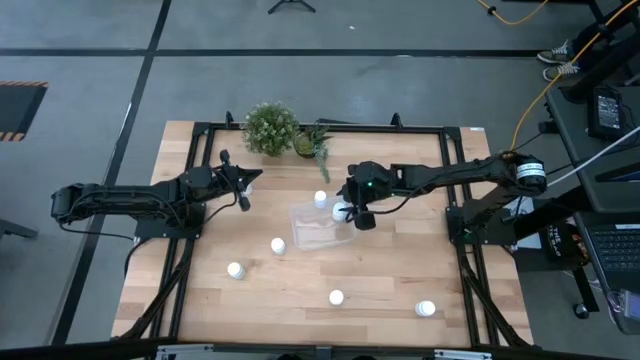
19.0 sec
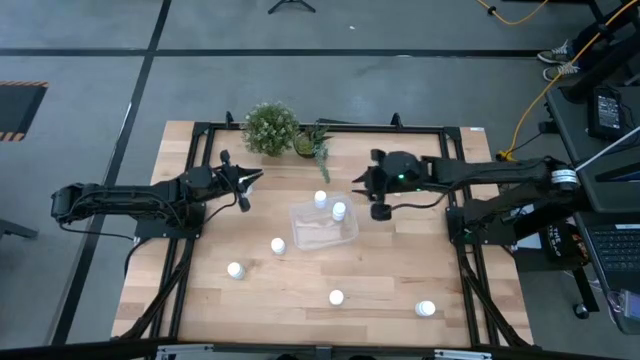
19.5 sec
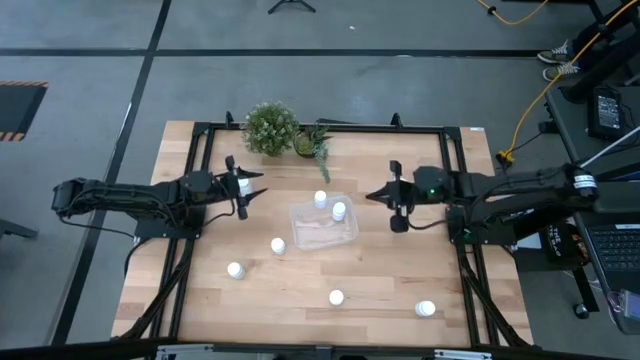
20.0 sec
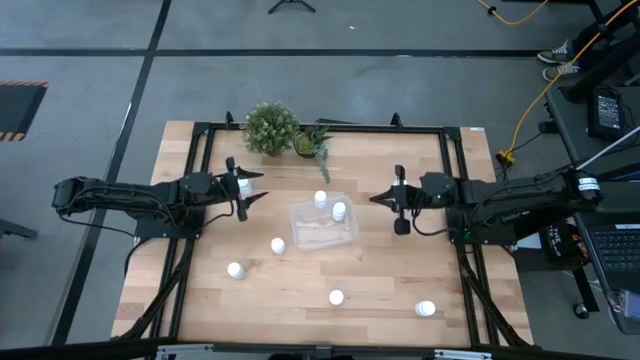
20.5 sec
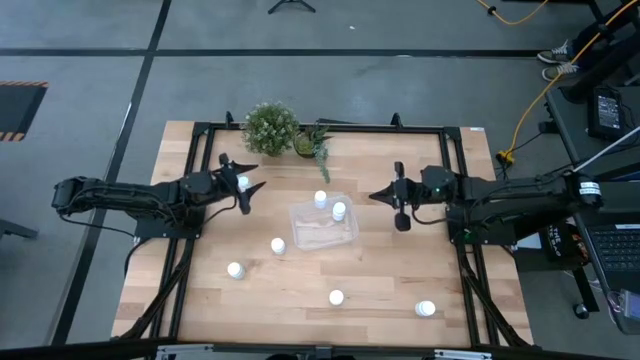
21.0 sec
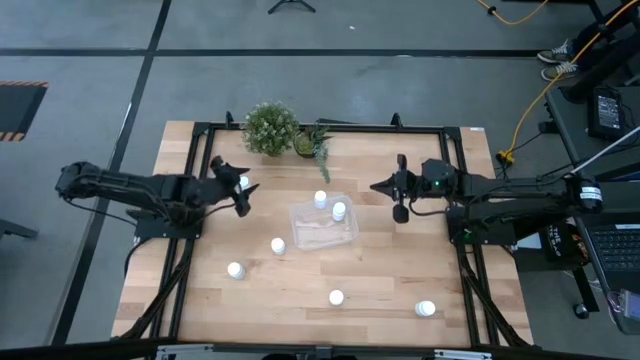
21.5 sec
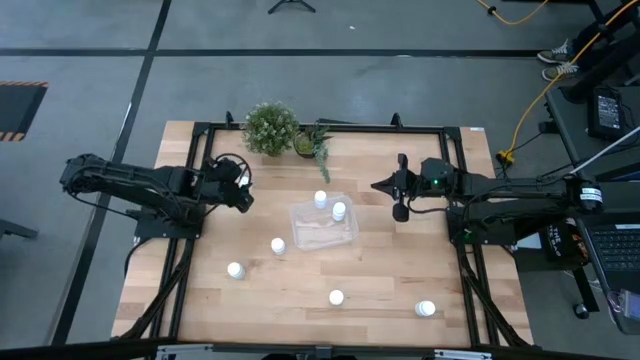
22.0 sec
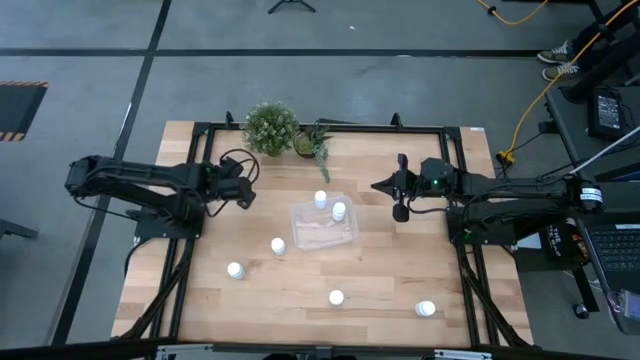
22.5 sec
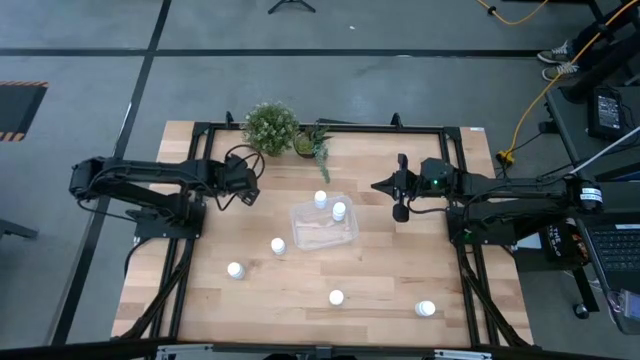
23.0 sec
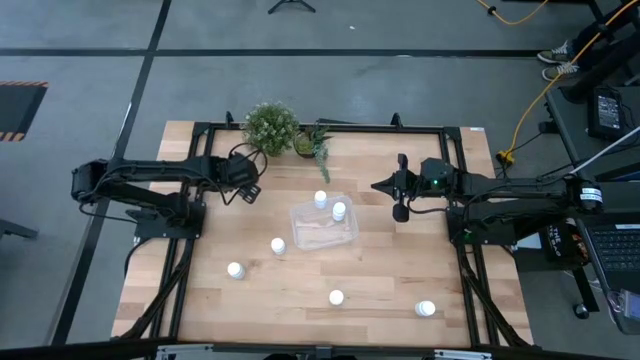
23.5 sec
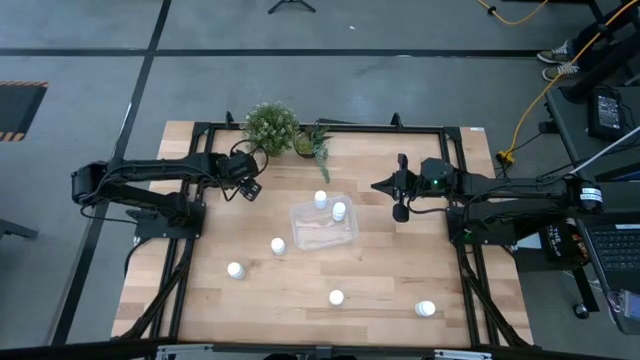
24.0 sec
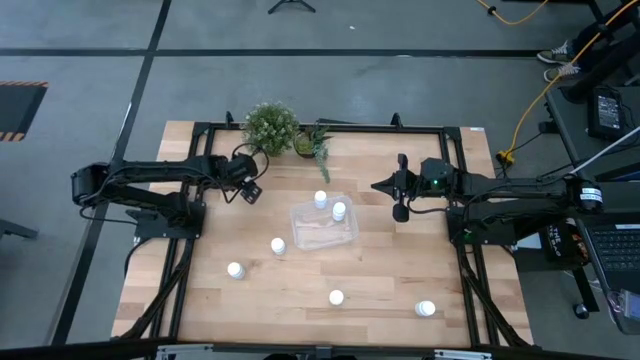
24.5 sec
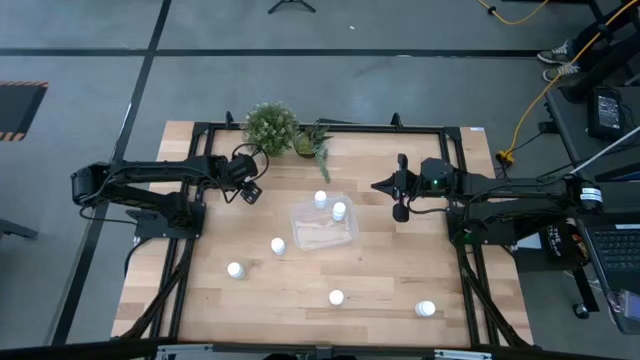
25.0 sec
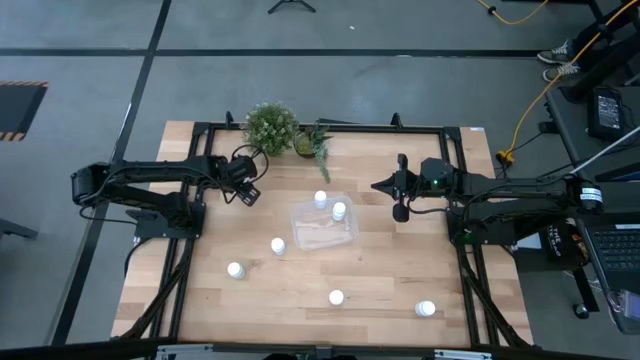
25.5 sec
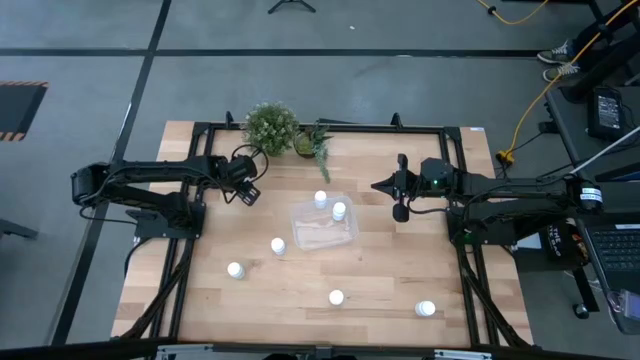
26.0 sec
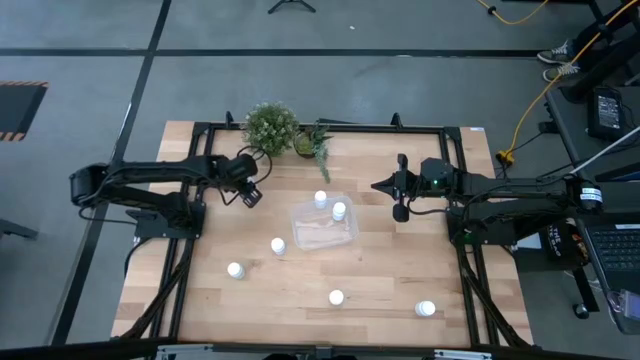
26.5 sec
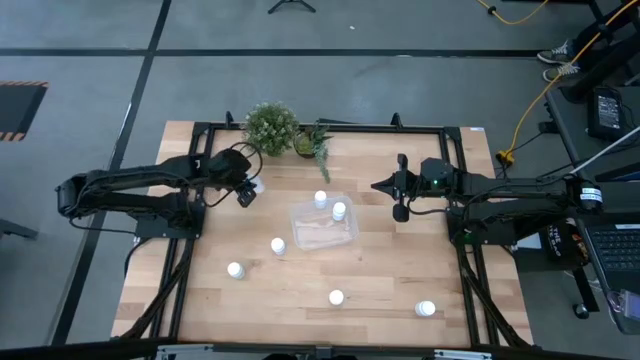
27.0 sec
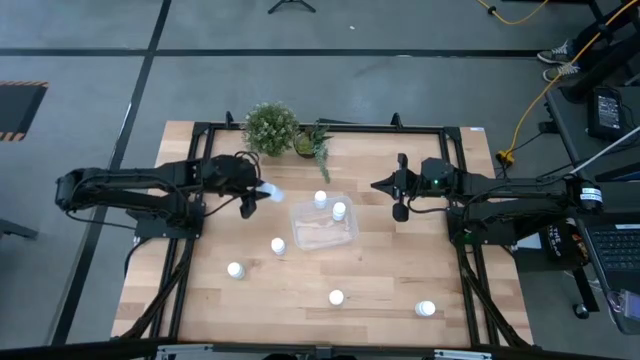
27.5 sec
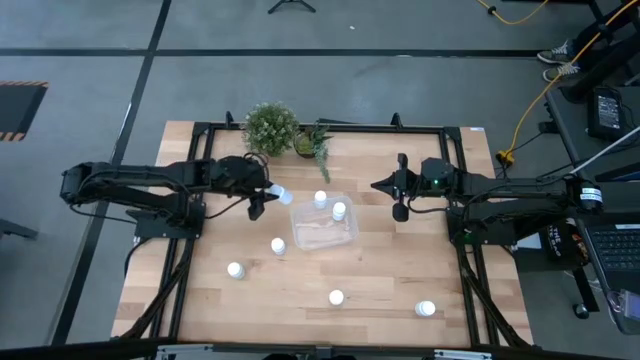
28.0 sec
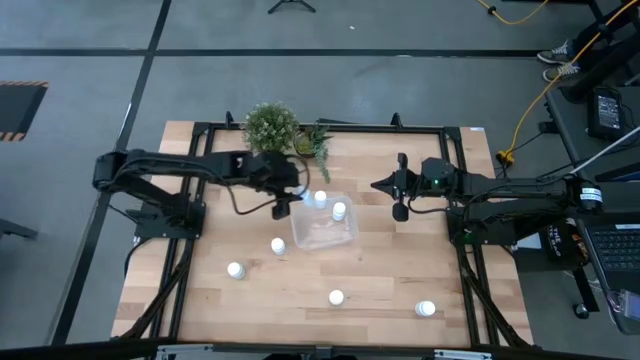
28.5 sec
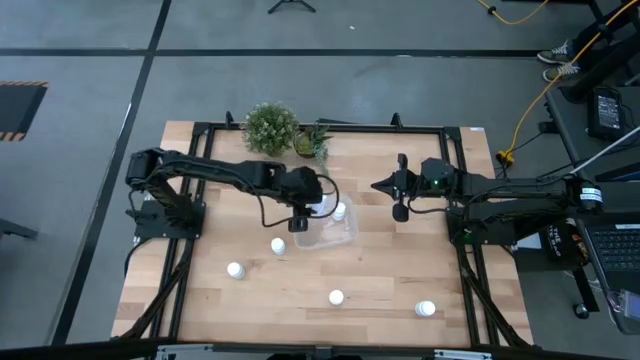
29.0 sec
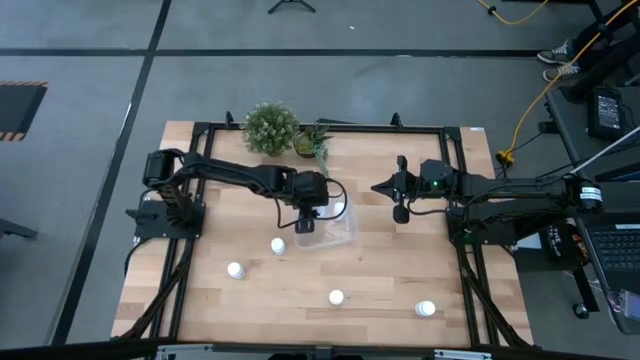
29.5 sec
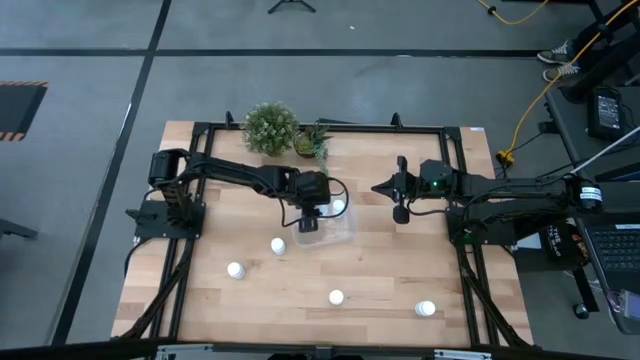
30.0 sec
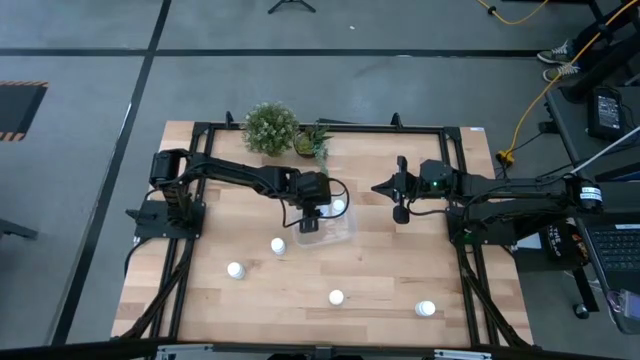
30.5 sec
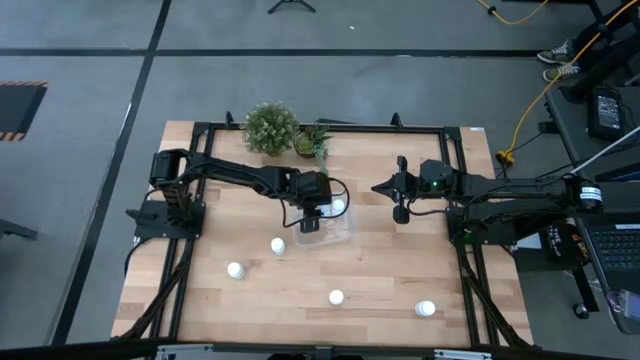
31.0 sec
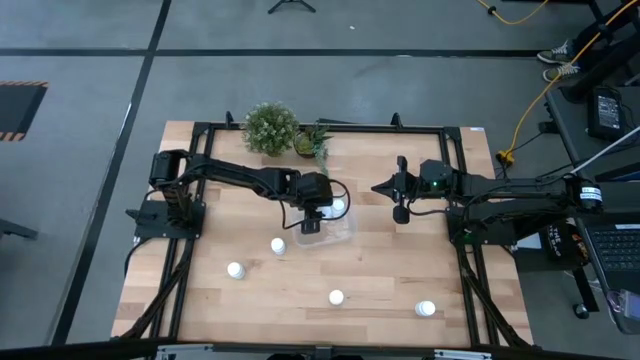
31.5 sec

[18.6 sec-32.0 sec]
Task: Pick and place pill bottles into a basket
Put the white pill bottle into the transparent bin

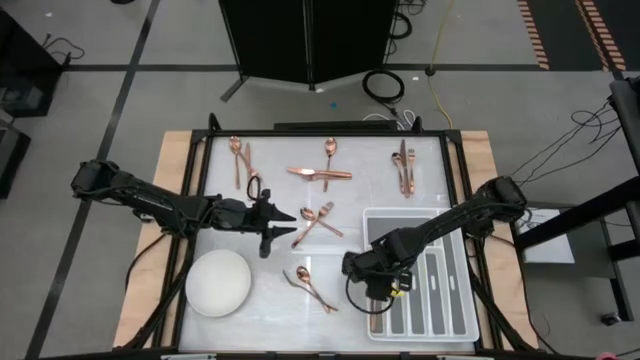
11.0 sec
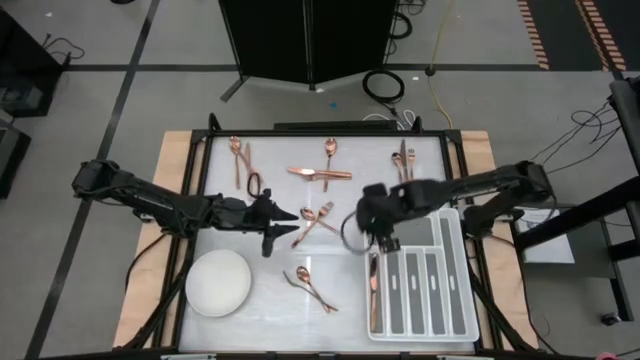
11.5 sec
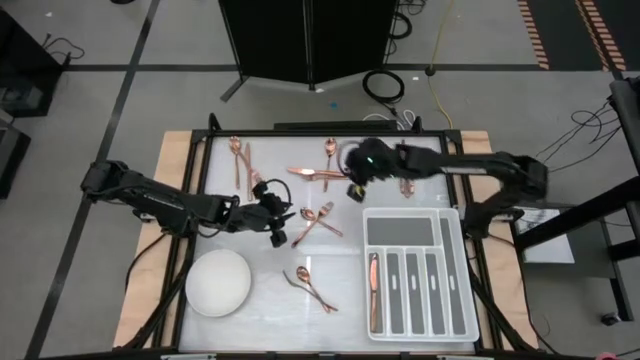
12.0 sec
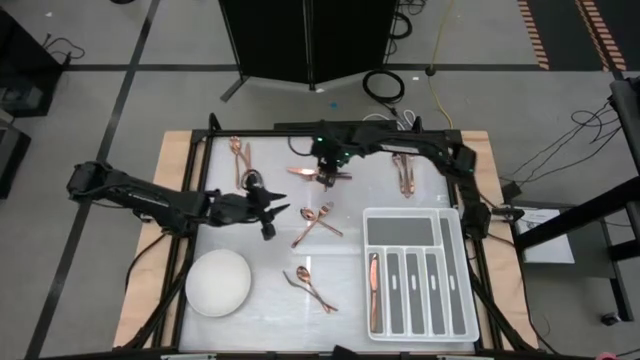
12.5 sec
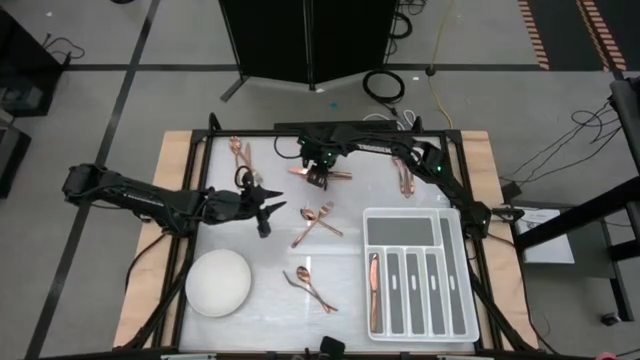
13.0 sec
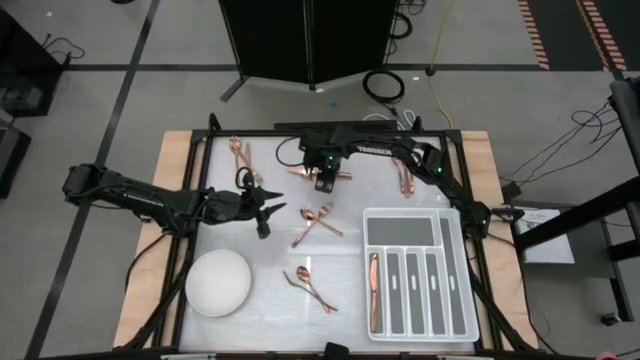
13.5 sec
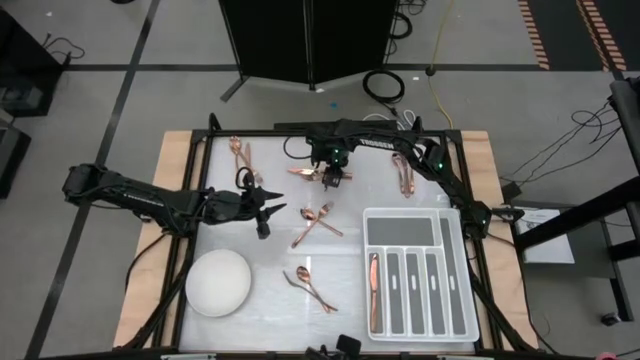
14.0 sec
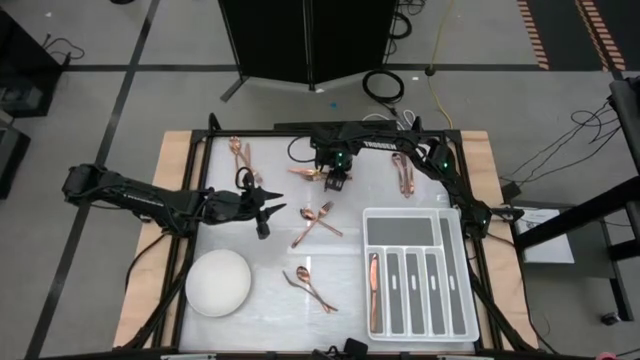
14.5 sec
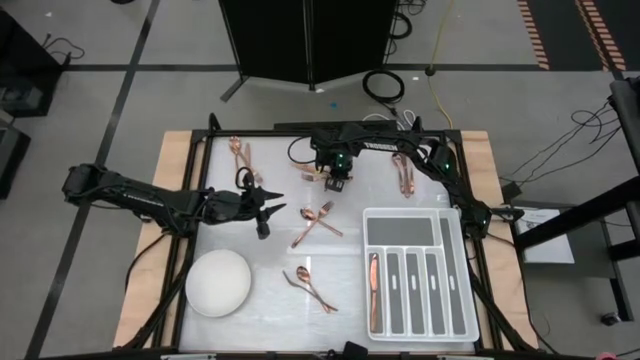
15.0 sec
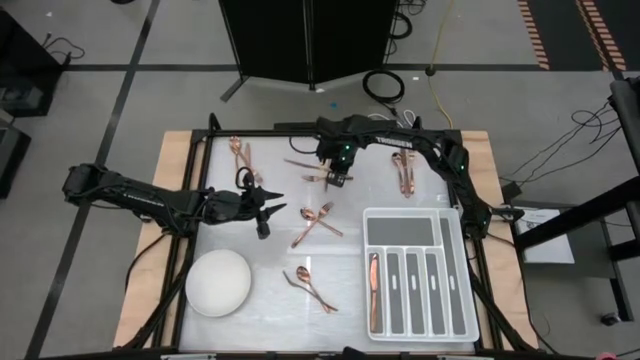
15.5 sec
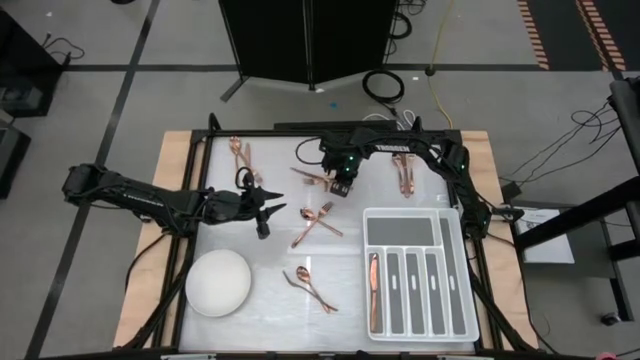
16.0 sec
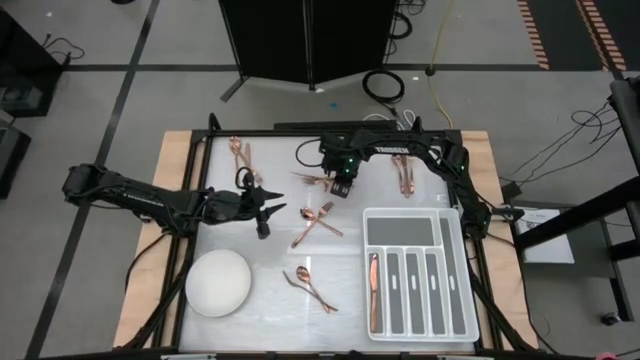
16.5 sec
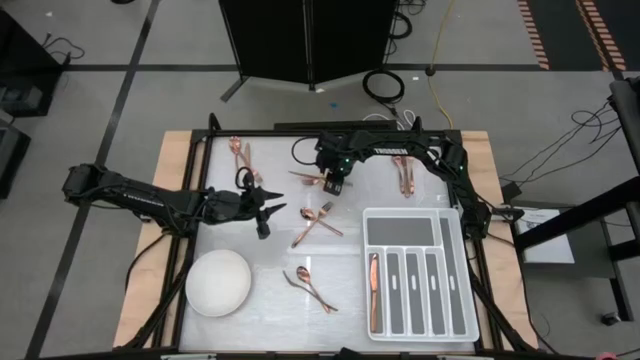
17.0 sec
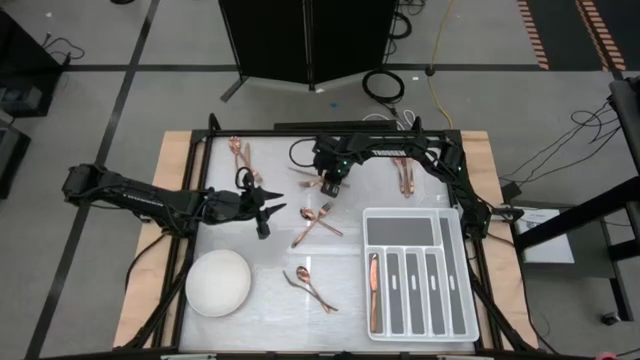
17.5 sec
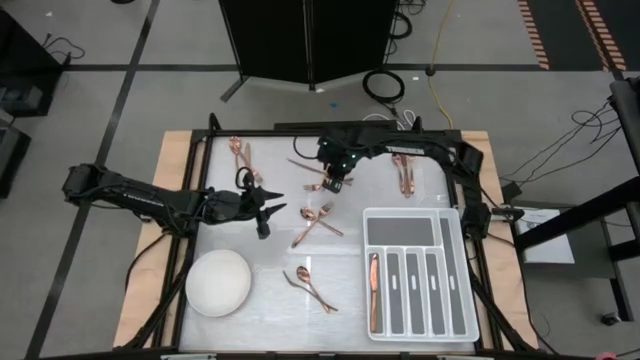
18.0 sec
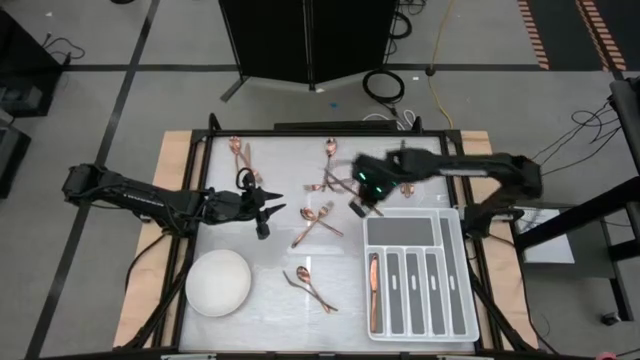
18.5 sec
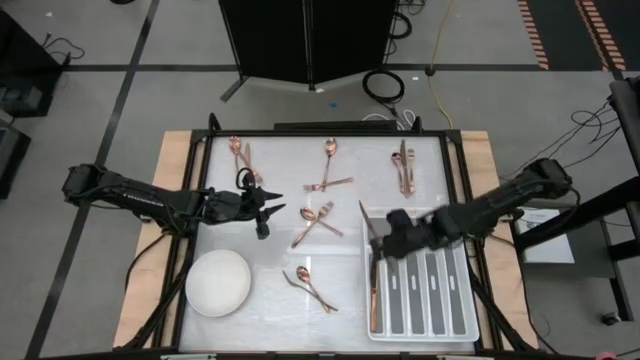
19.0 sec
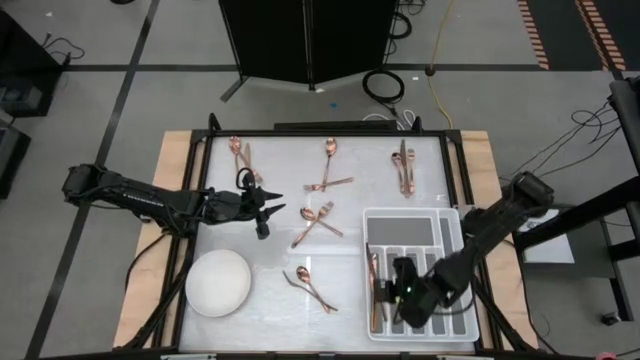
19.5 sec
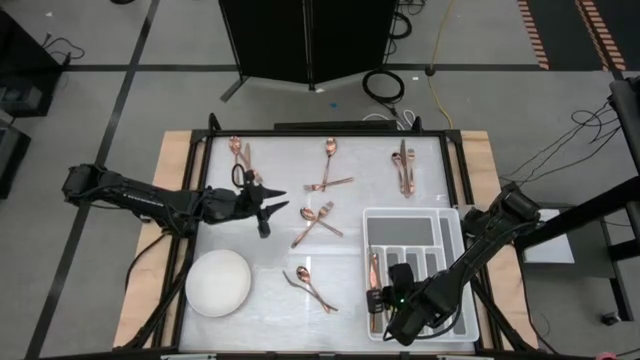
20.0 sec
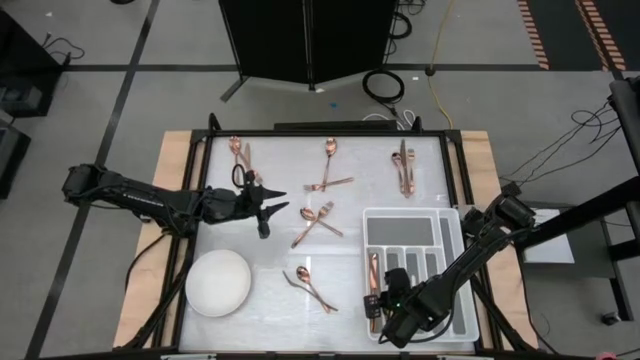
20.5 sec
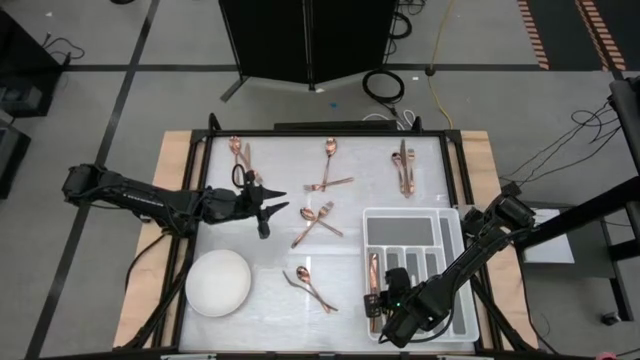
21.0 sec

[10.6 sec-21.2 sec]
Task: Sort silverware
Put the middle brown knife in white silverware organizer
